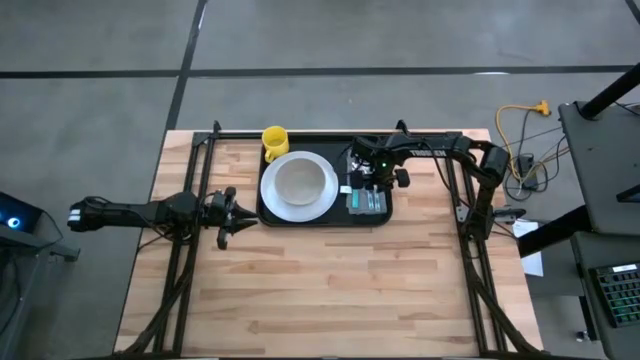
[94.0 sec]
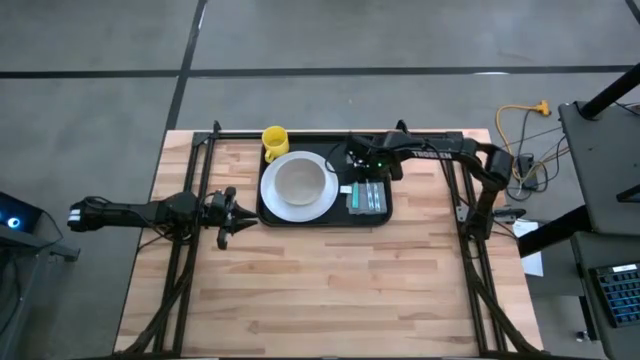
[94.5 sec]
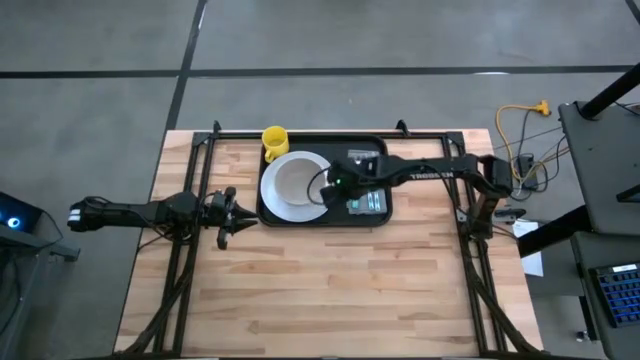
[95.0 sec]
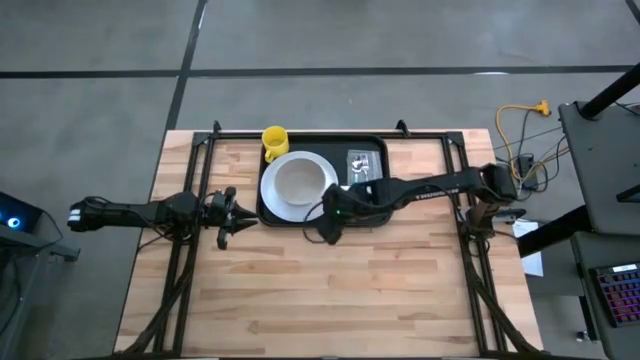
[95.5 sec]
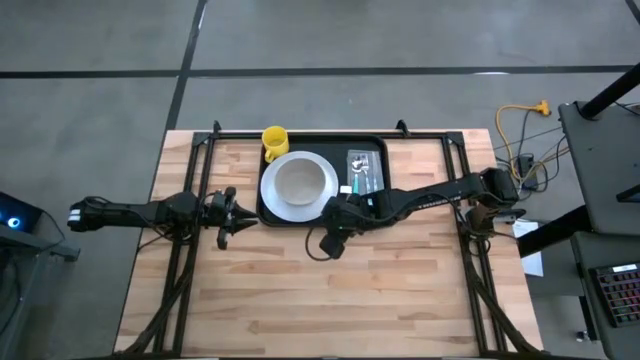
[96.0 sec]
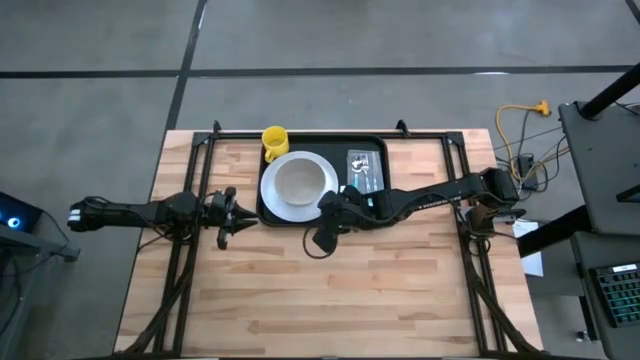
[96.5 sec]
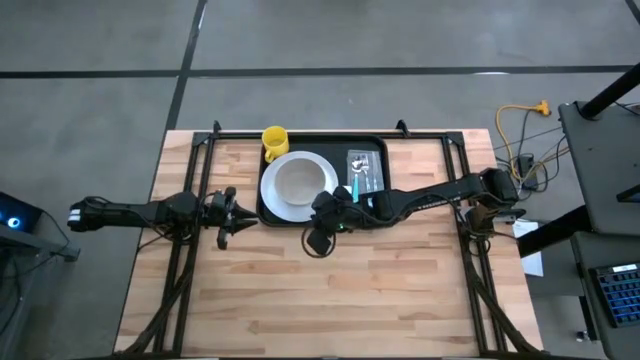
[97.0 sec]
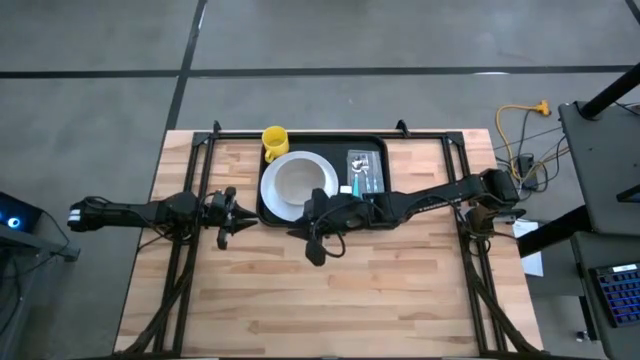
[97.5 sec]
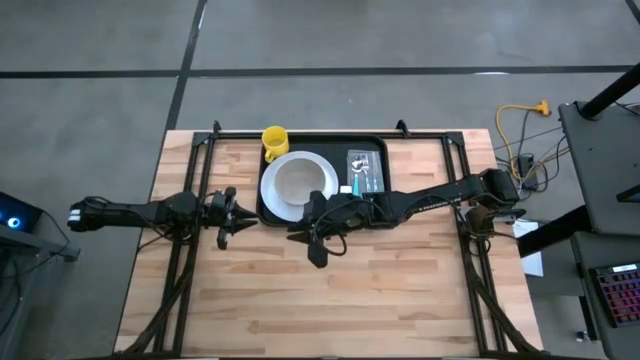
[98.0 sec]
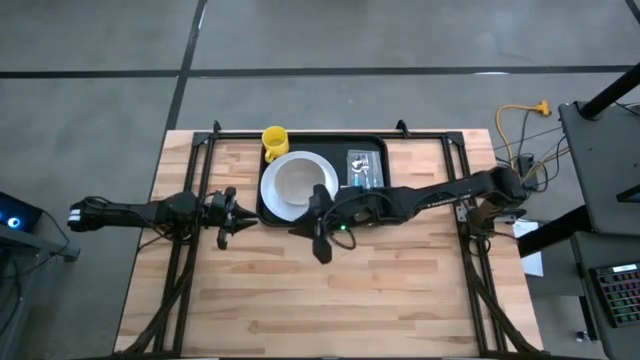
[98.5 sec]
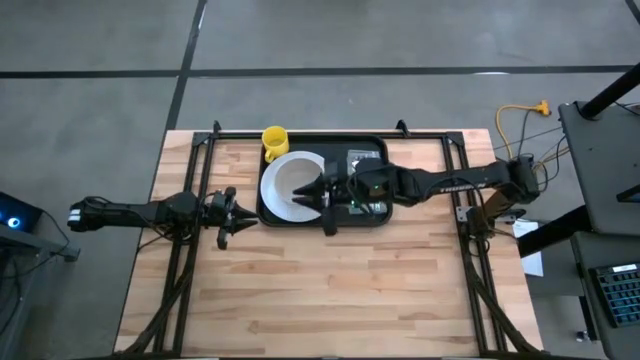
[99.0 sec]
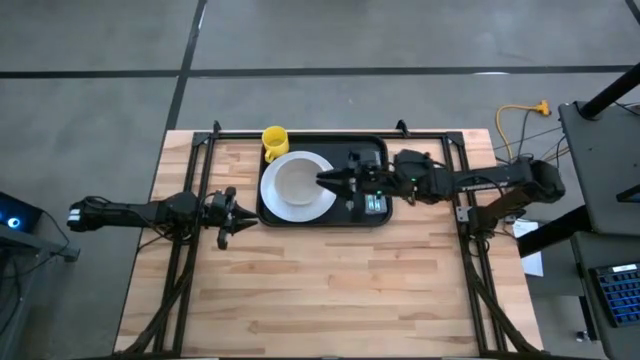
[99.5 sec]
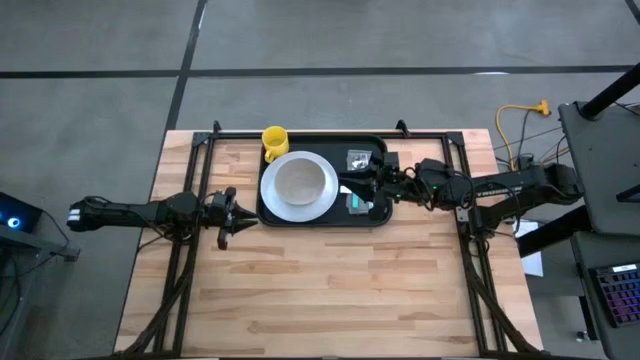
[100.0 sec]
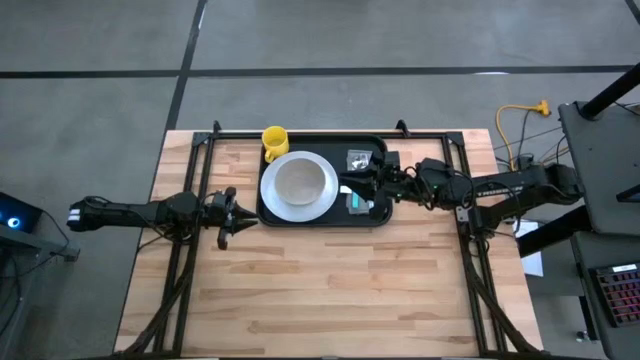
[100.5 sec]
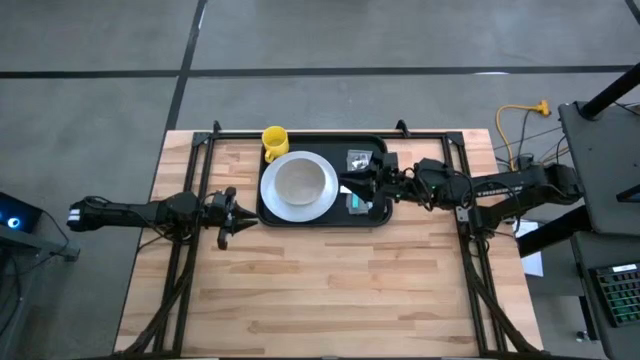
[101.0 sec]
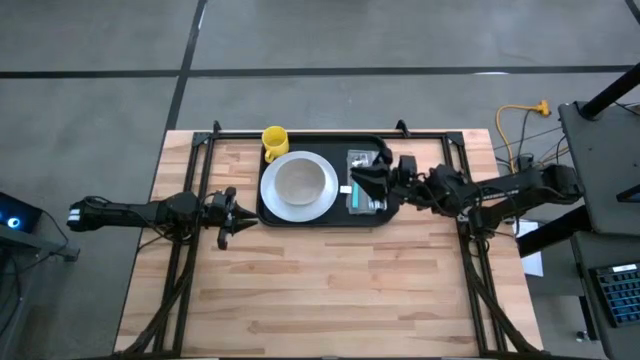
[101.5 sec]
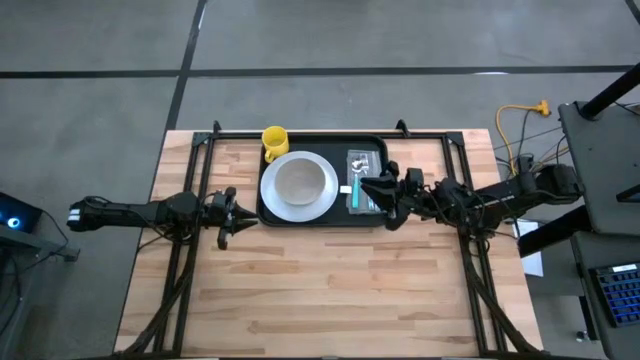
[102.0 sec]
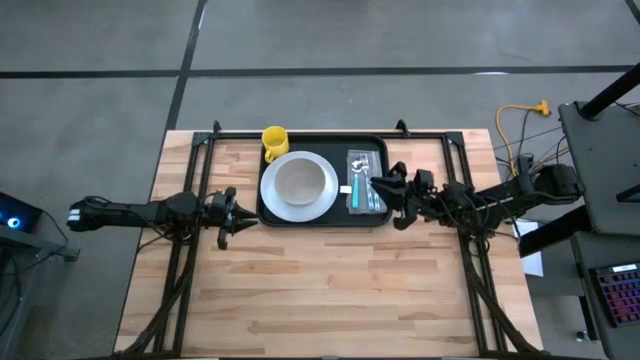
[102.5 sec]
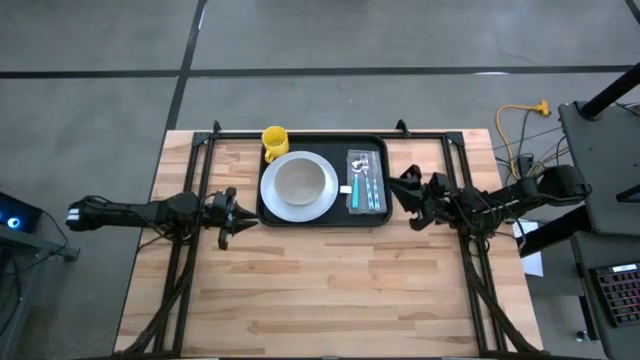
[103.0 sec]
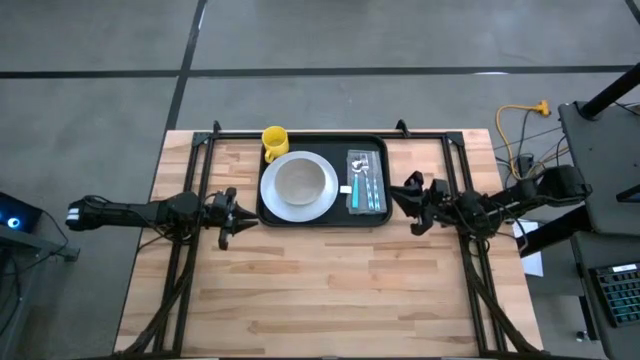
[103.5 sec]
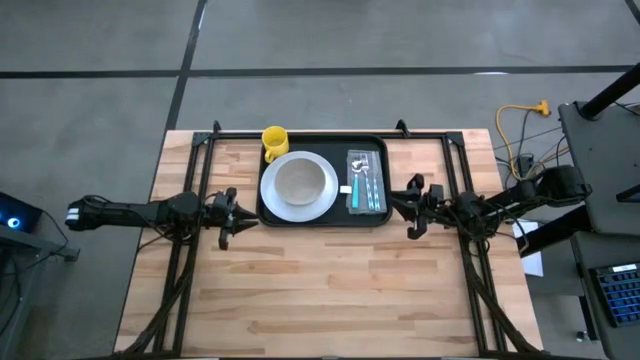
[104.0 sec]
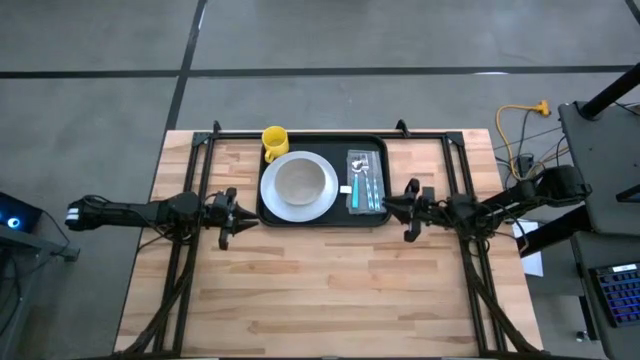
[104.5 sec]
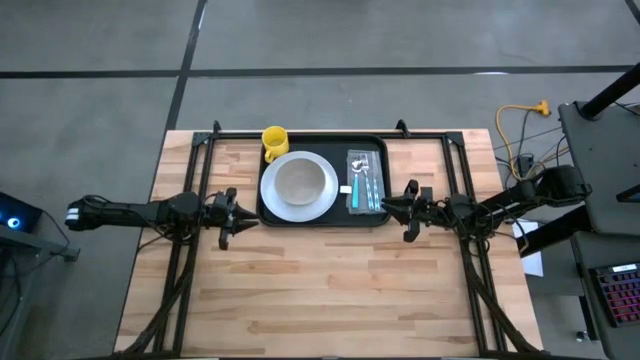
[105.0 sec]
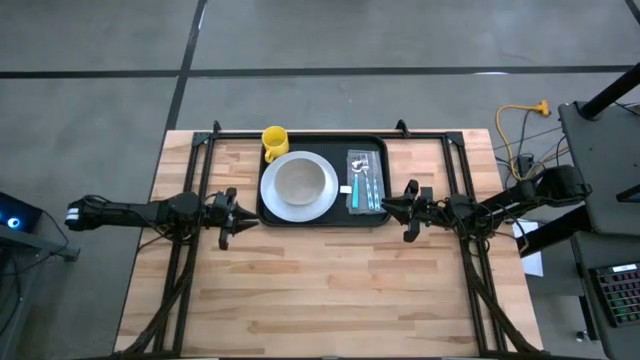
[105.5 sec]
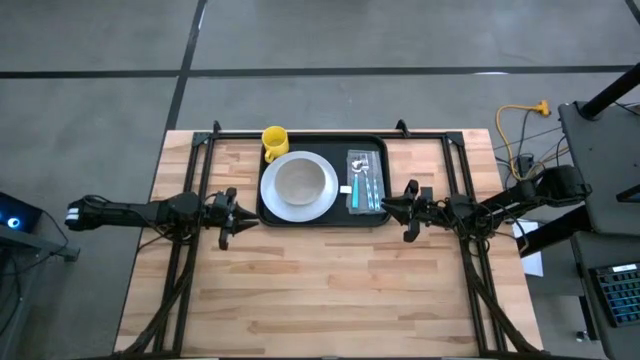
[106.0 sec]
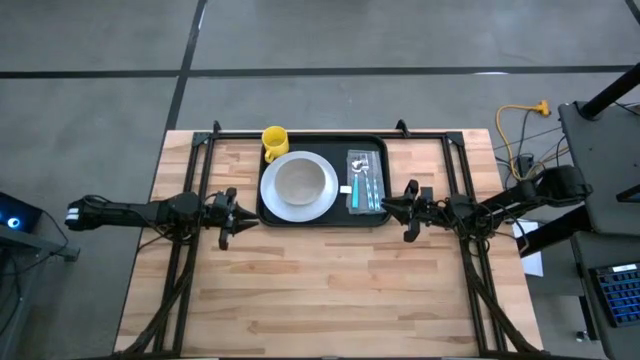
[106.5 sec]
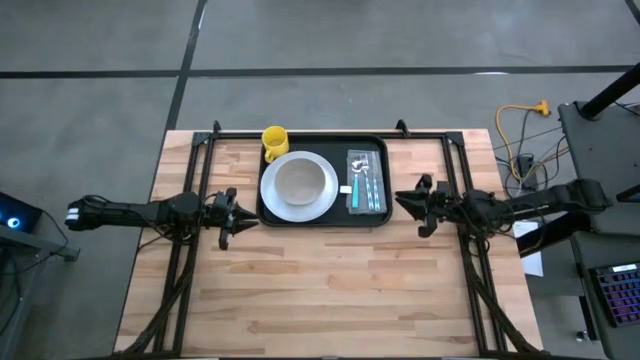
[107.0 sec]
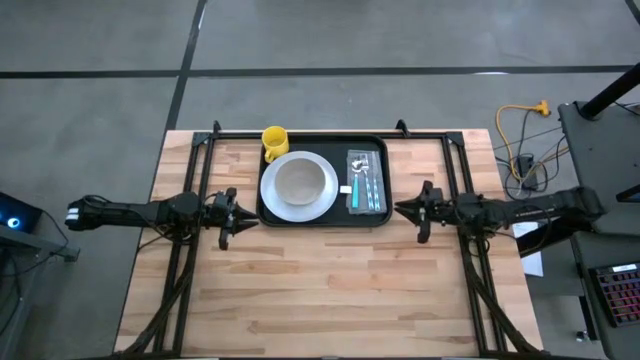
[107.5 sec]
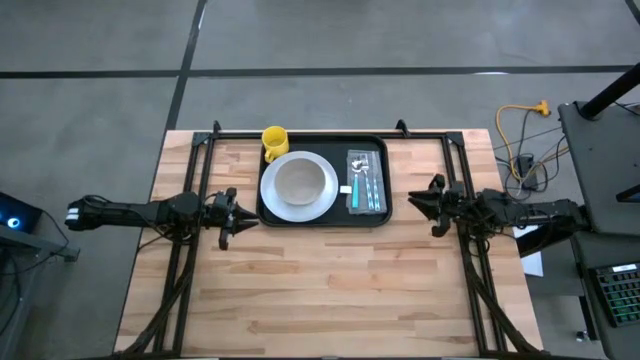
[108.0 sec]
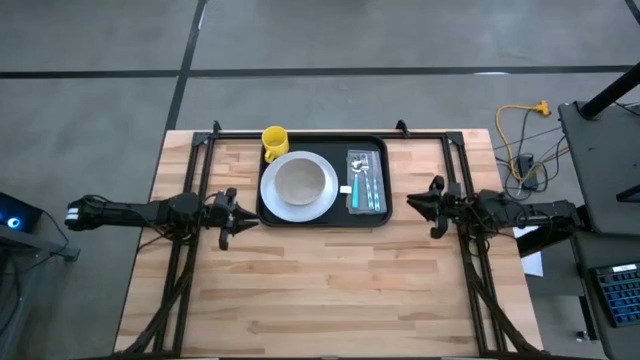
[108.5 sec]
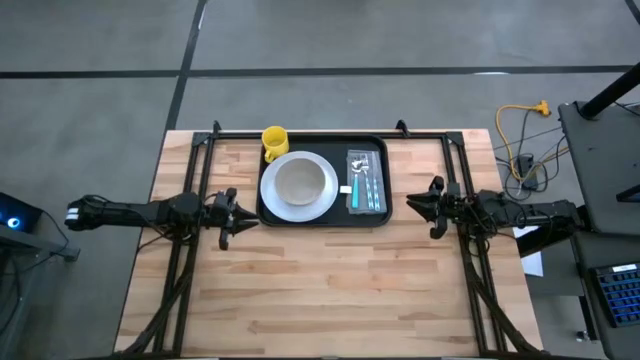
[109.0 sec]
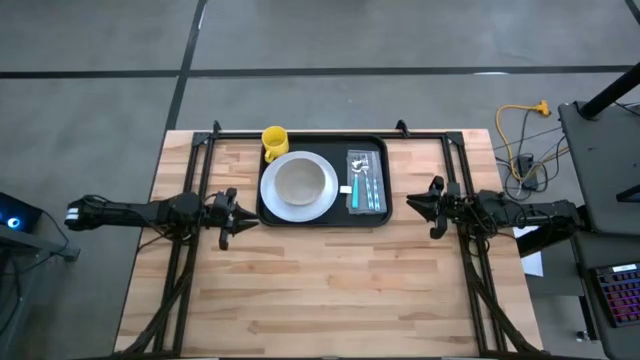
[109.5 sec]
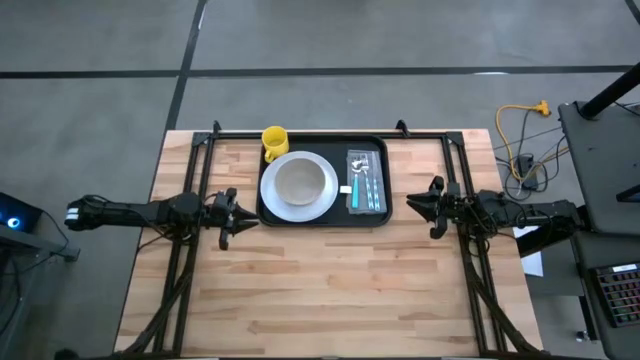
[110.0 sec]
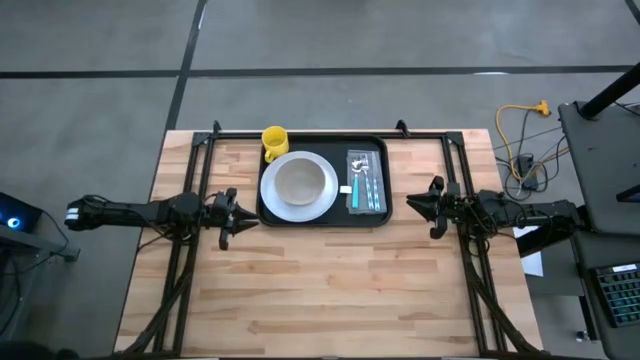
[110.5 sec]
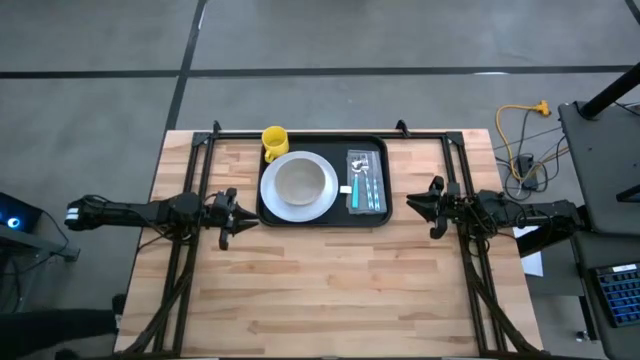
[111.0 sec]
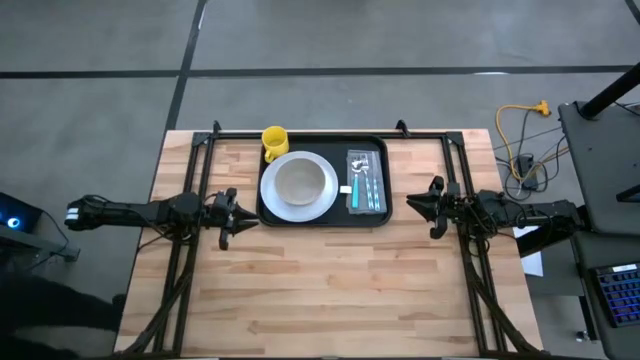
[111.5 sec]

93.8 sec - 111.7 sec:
Task: Set up tray
Return to Home Position

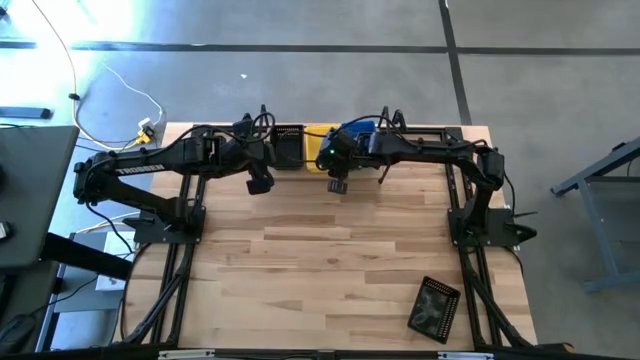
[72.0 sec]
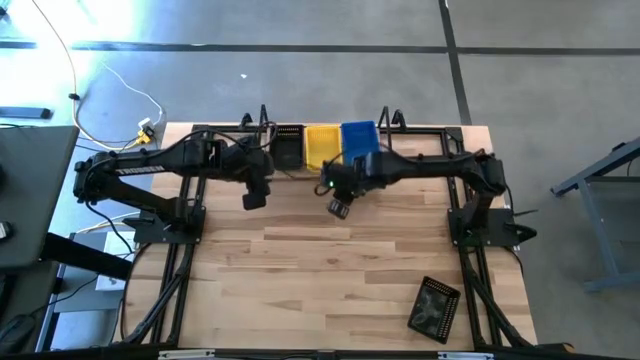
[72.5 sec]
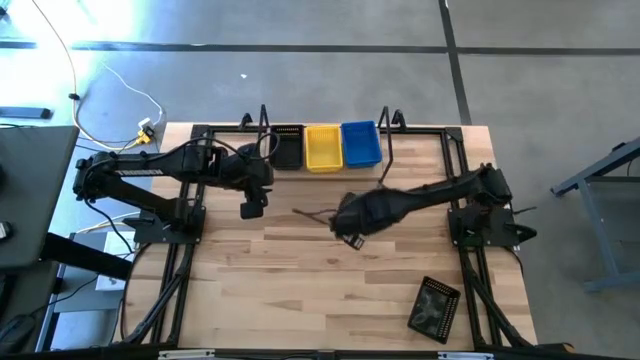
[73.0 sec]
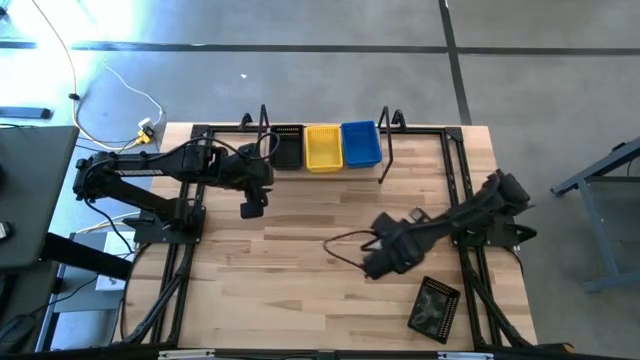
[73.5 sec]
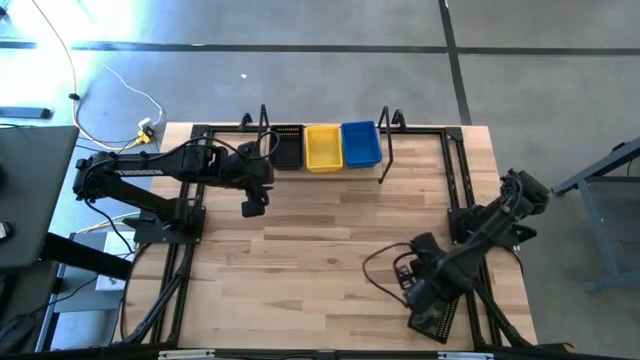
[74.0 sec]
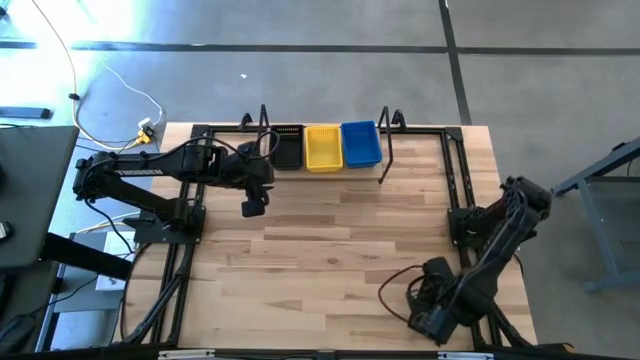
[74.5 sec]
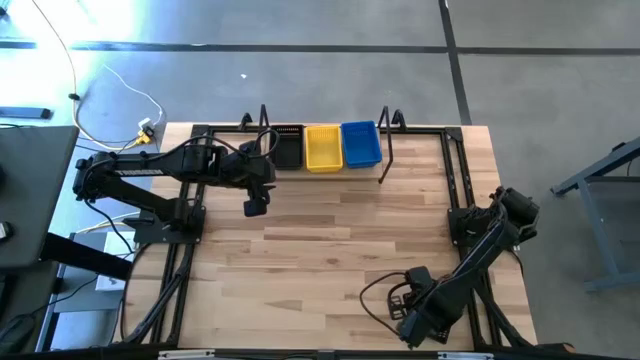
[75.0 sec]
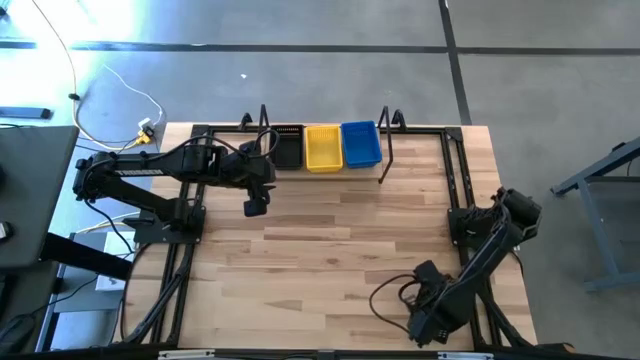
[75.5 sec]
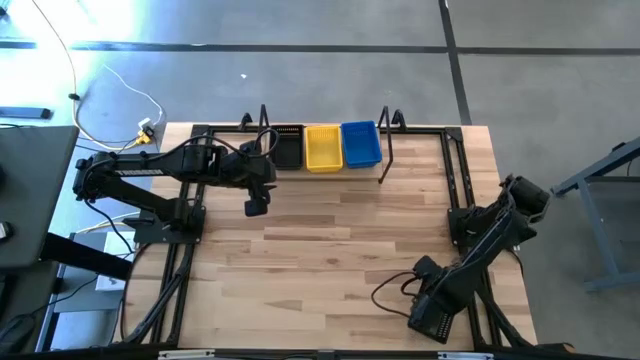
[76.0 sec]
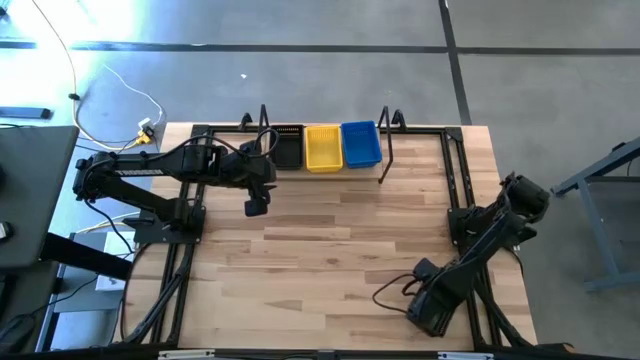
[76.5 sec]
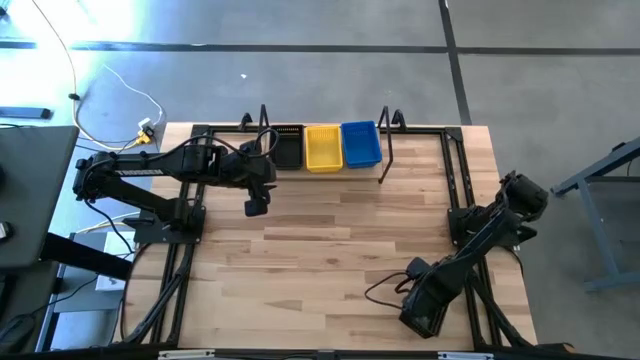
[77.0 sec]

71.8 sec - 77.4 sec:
Task: Stack baskets on shelf by color
Stack the black bin on top of the blue bin on the shelf
